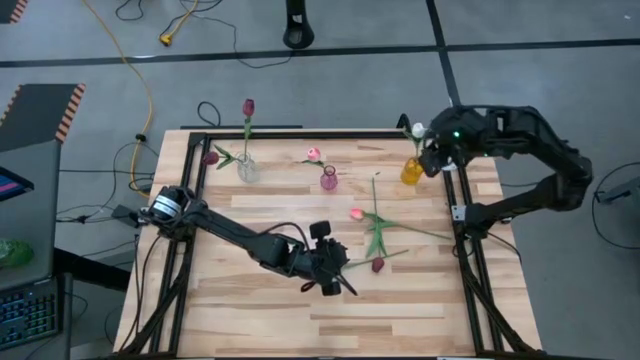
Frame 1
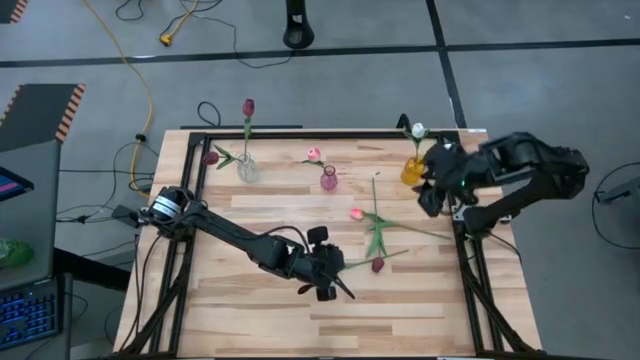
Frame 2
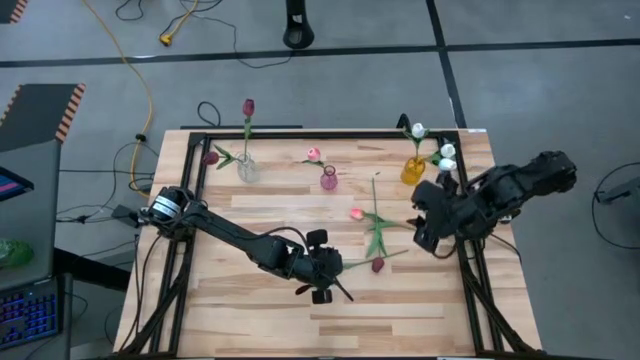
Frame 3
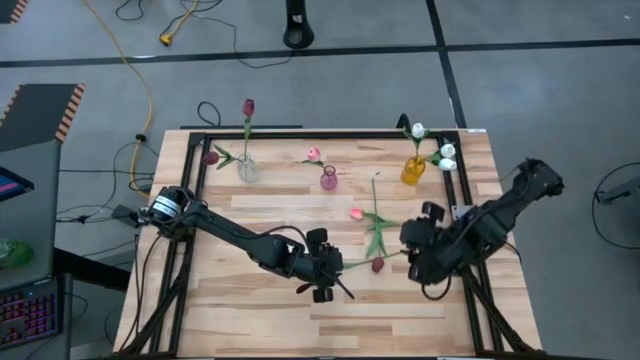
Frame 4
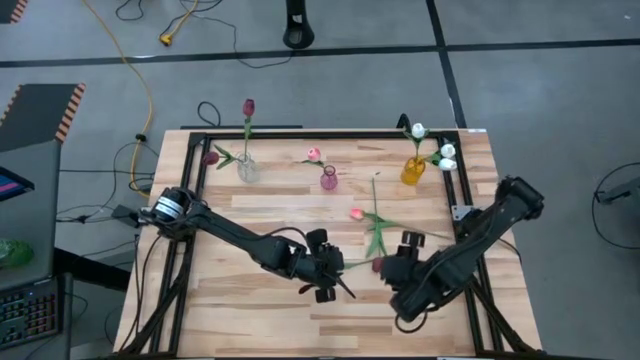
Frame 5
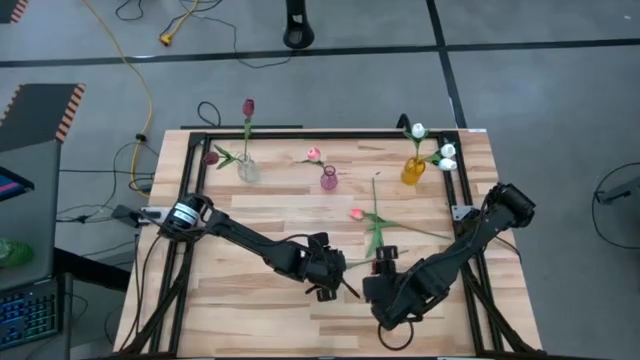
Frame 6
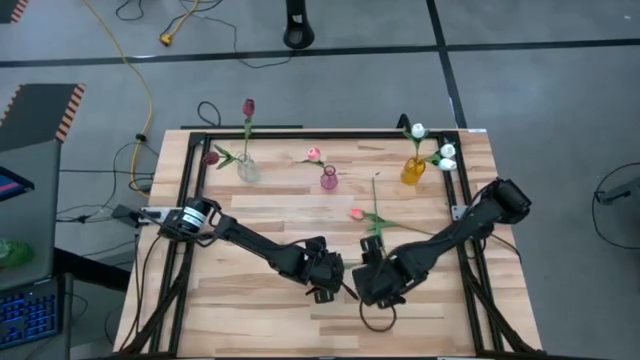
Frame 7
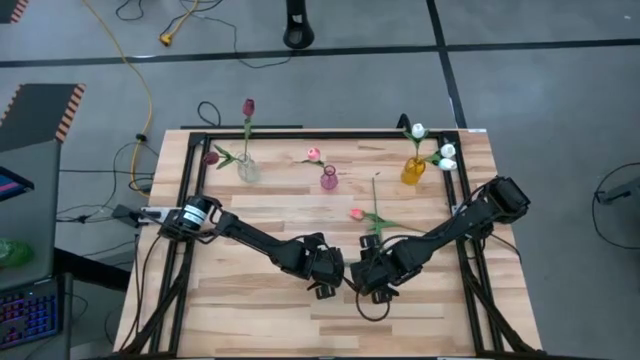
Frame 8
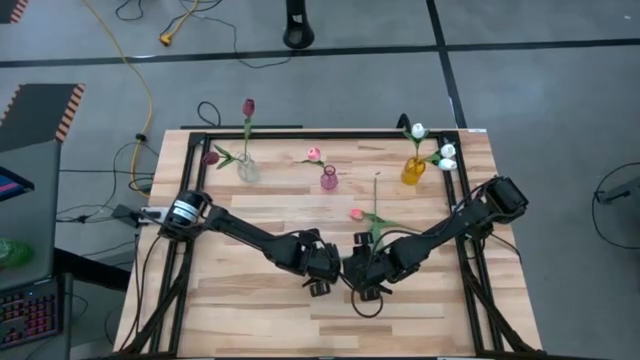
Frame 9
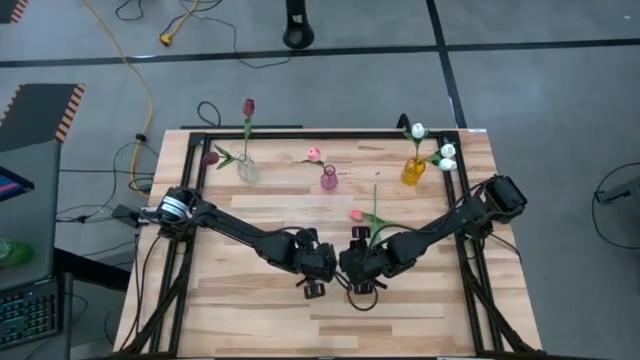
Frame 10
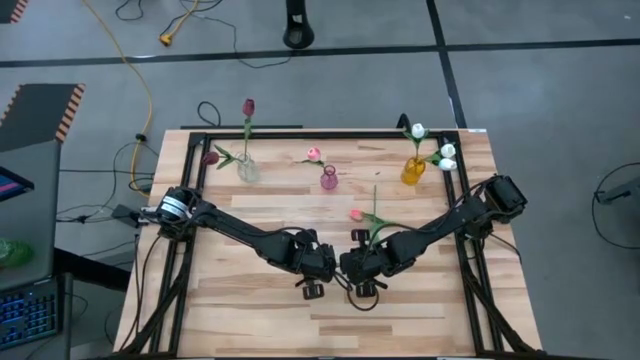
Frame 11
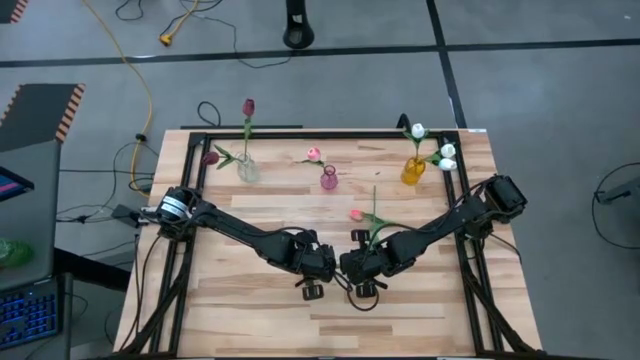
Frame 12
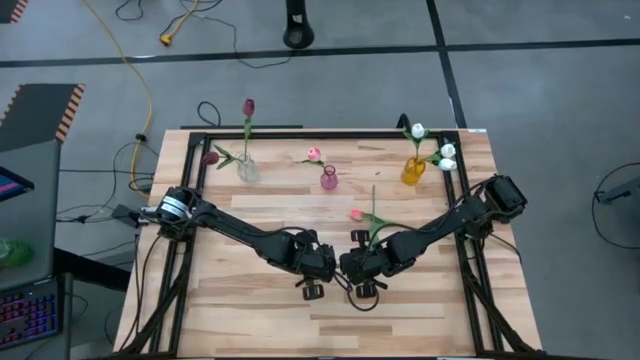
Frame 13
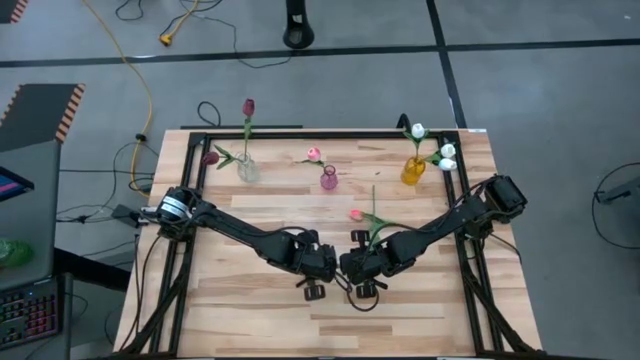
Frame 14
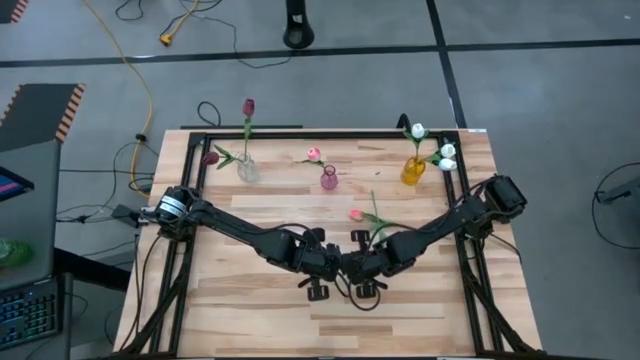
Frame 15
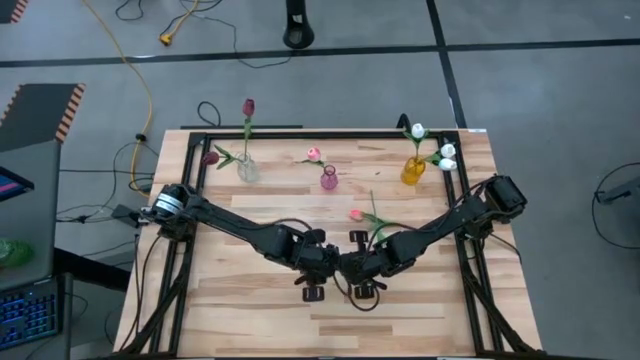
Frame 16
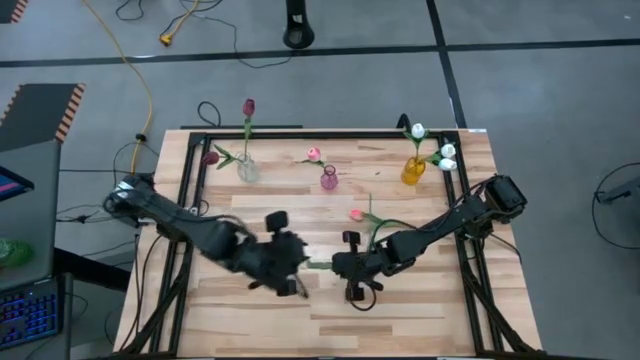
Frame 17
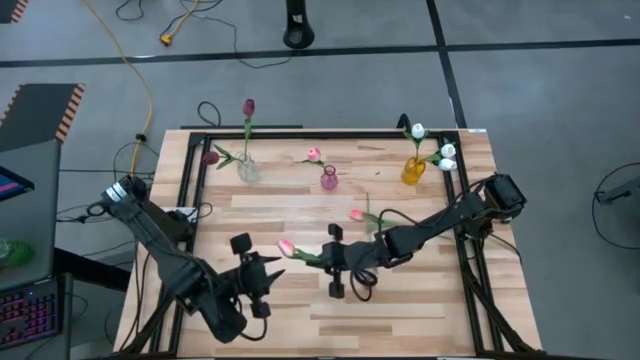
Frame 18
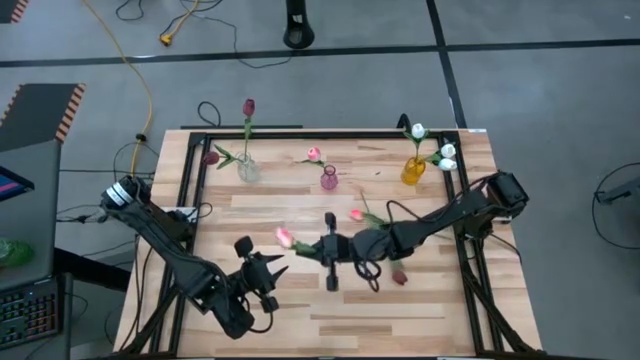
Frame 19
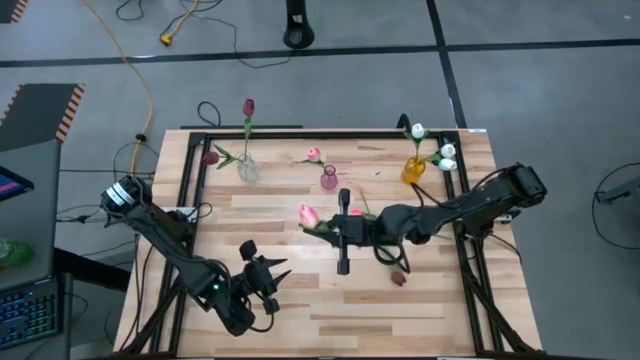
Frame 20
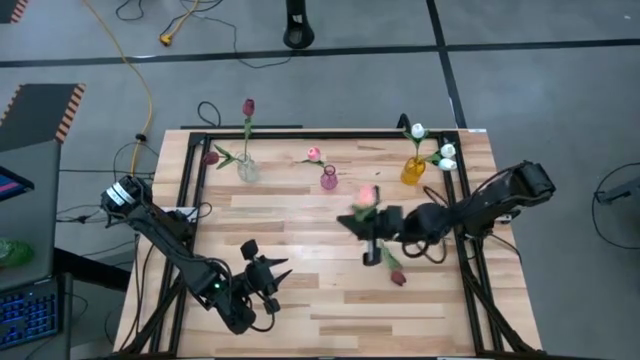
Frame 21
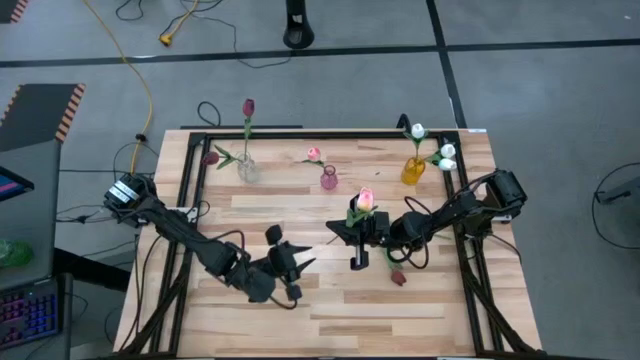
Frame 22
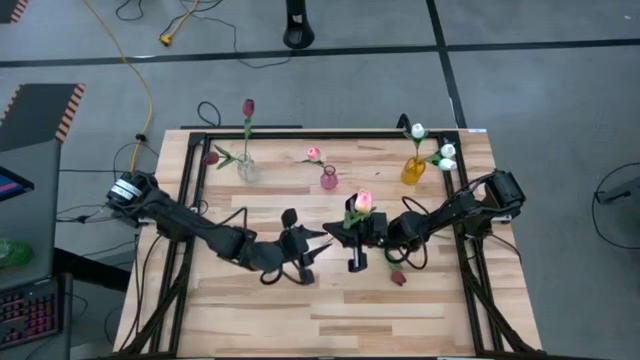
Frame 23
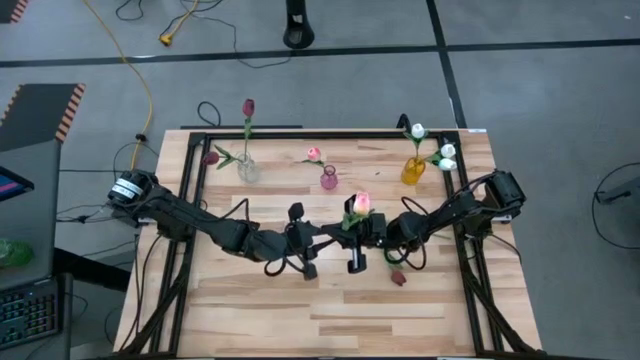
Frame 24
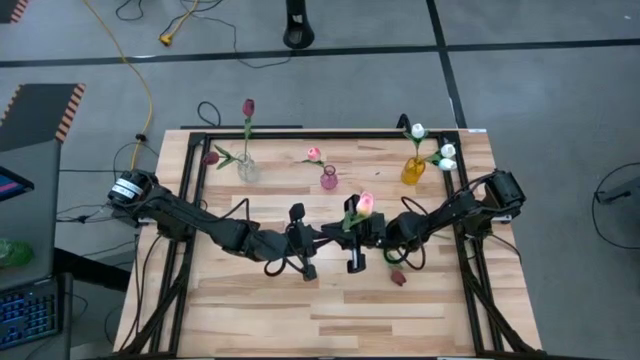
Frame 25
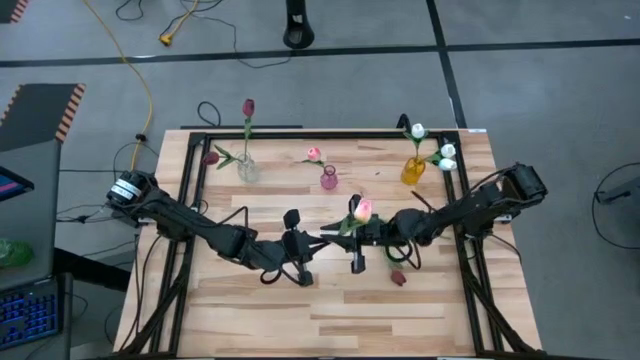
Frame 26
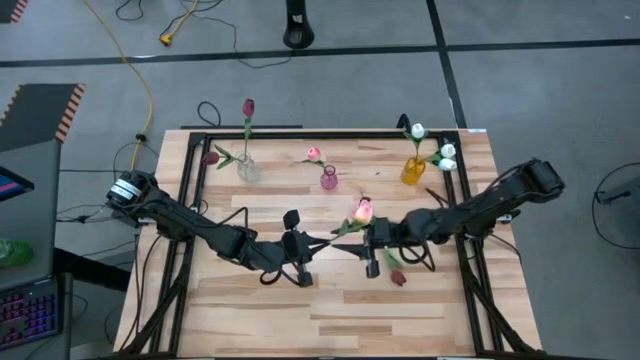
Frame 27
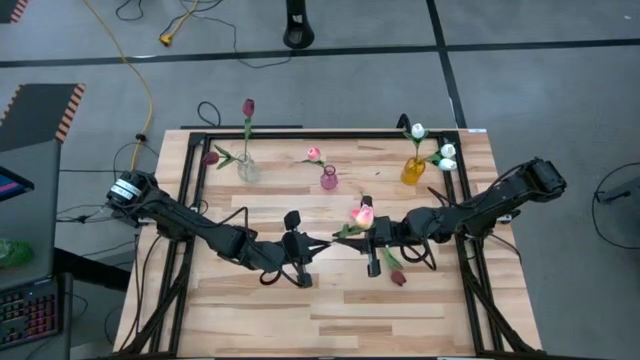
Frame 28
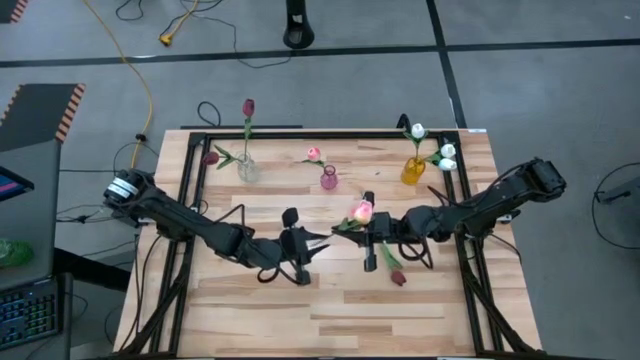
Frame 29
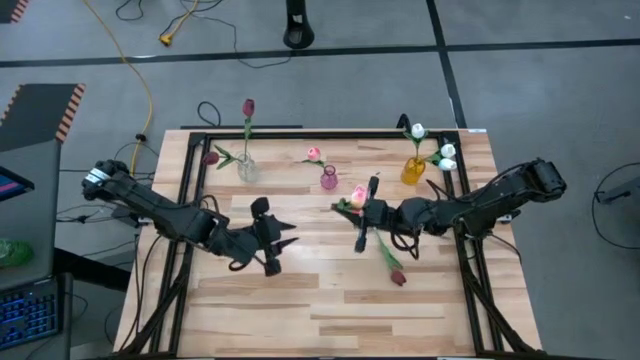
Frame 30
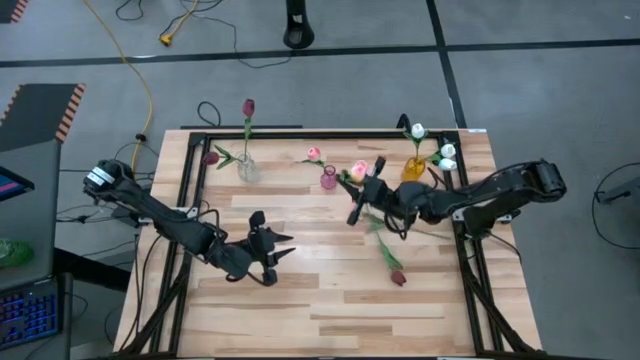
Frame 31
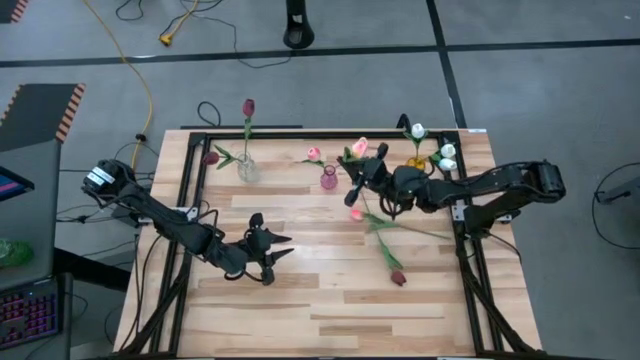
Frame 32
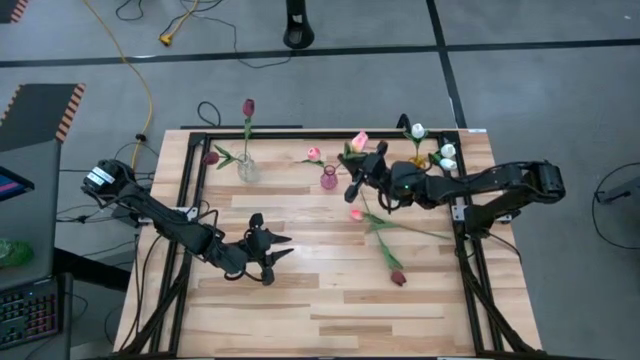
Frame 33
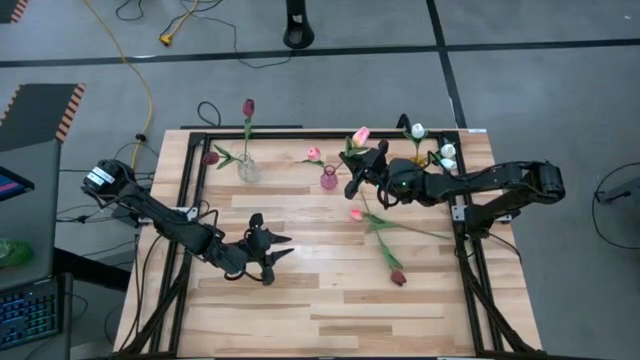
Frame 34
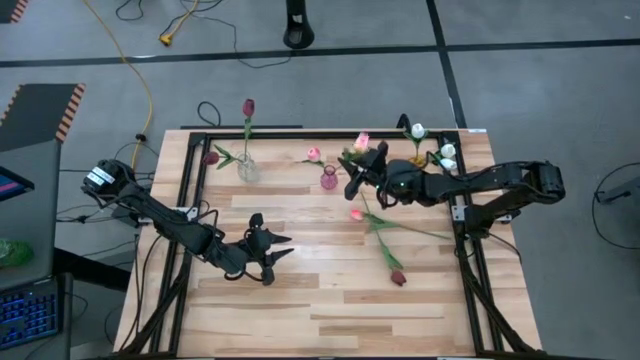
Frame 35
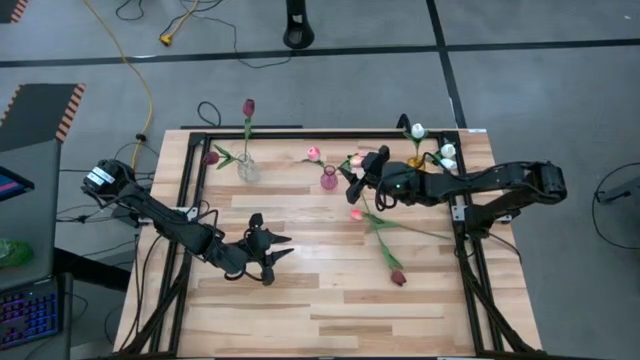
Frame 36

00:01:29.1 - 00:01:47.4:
Task: Sort flowers into vase by color
Put the bottom pink flower into the purple vase

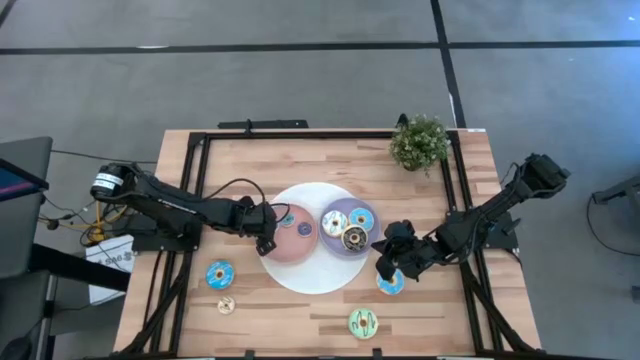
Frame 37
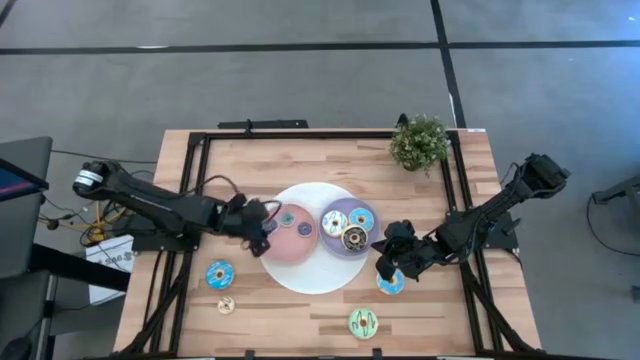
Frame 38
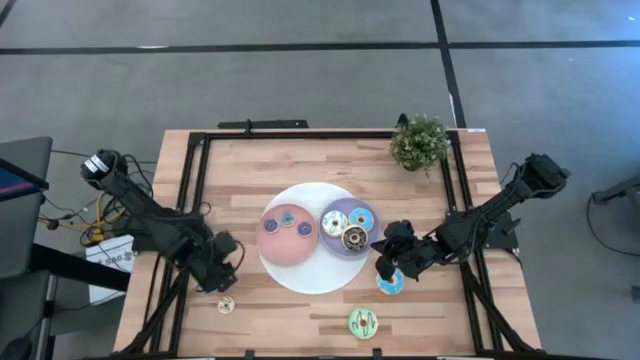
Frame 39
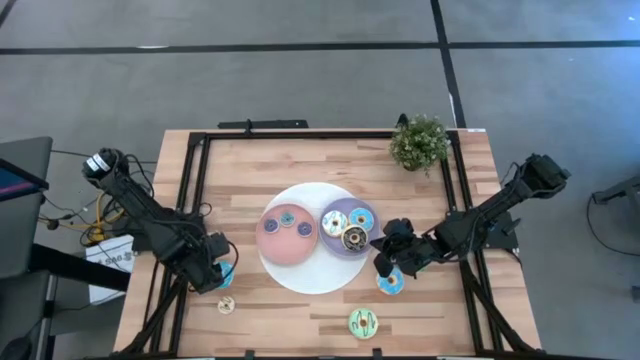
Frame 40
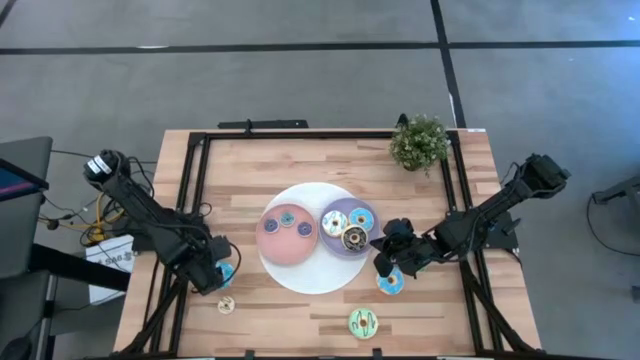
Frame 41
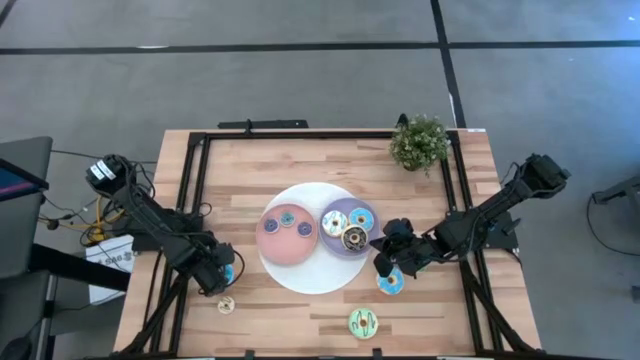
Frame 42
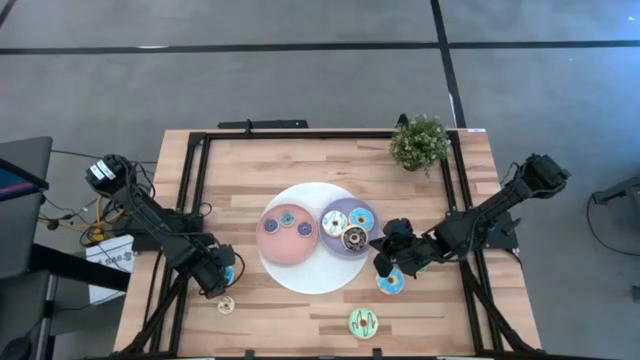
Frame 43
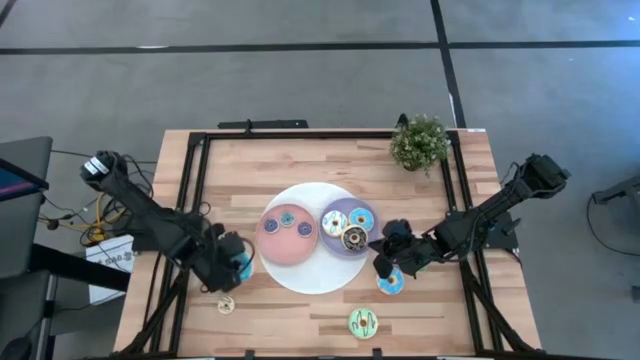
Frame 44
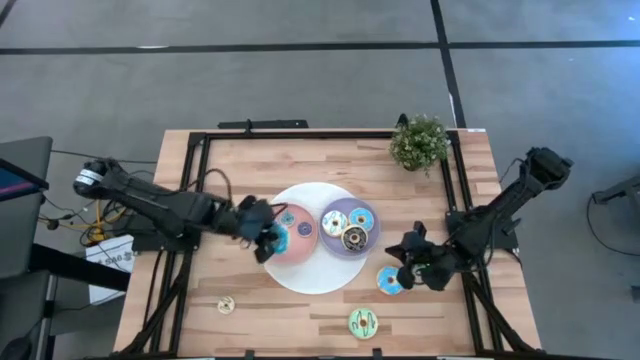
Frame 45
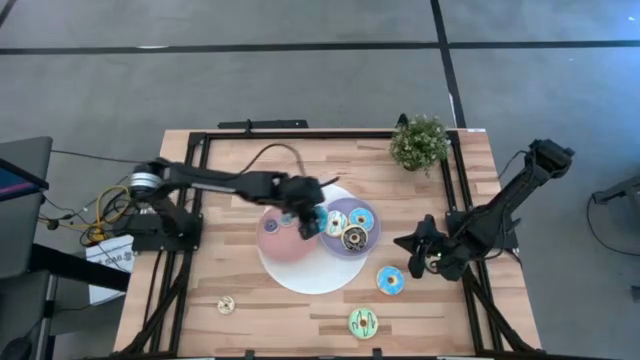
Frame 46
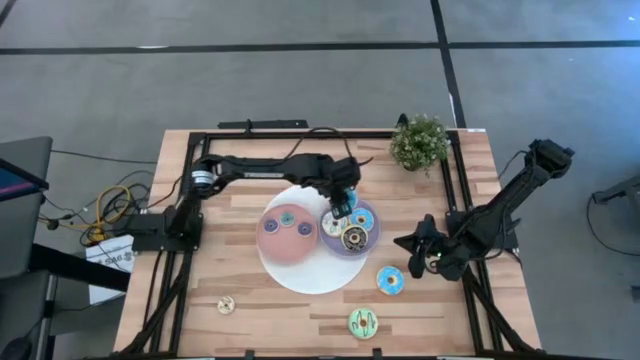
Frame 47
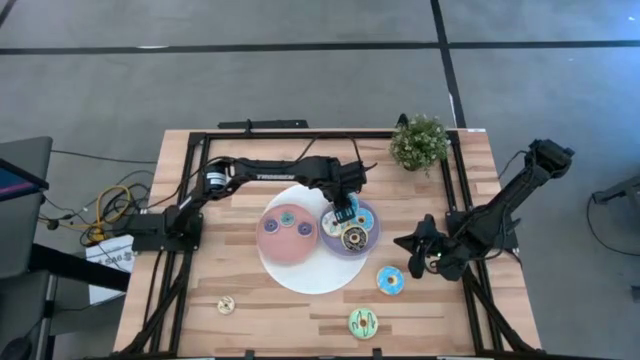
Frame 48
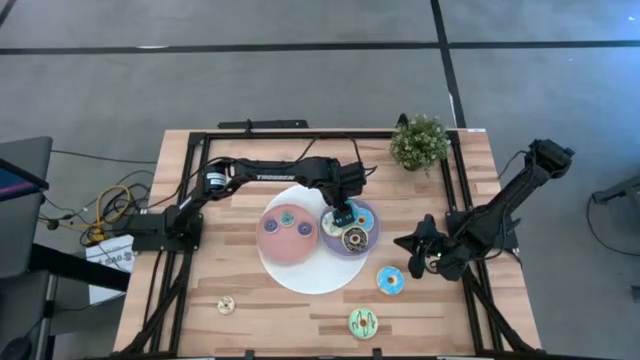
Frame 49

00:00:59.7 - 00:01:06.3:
Task: Pick & Place donuts
Put the left big blue donut on the violet plate
